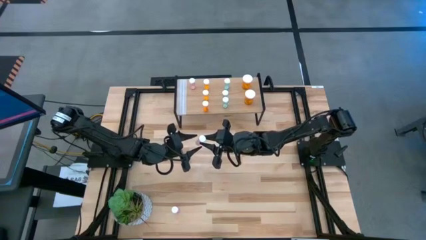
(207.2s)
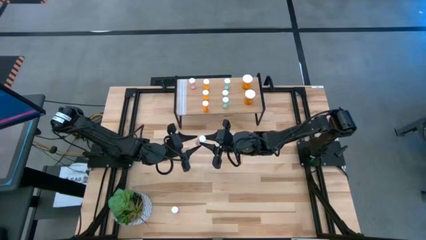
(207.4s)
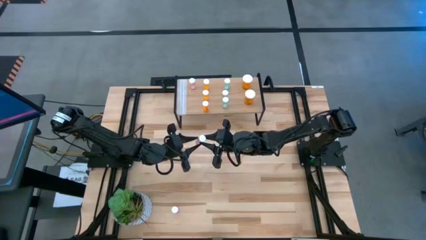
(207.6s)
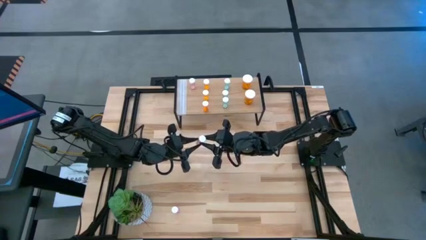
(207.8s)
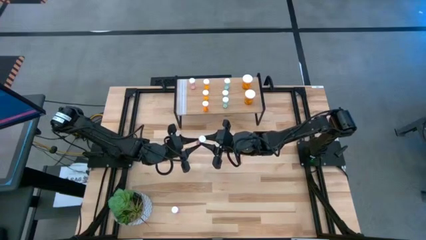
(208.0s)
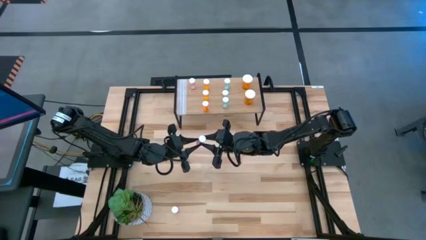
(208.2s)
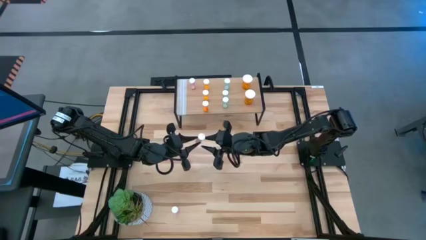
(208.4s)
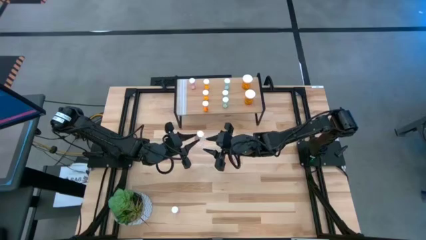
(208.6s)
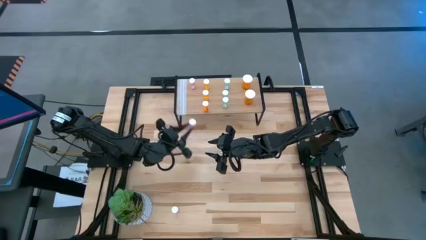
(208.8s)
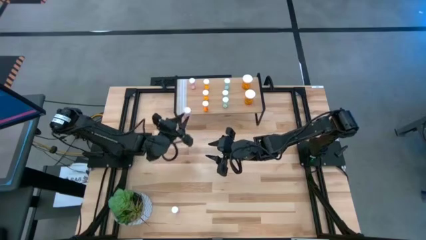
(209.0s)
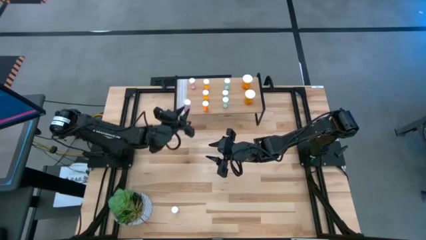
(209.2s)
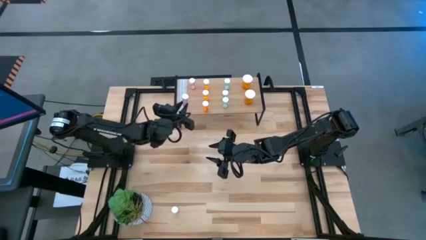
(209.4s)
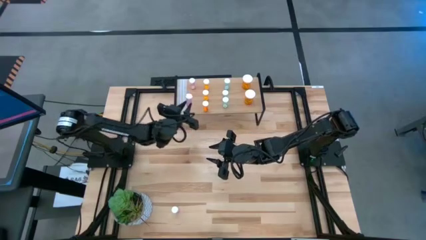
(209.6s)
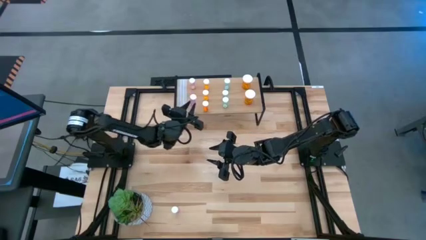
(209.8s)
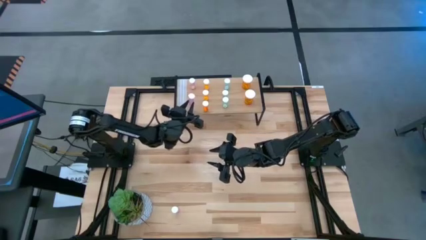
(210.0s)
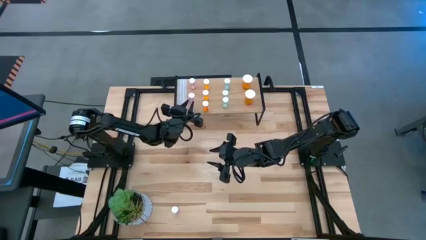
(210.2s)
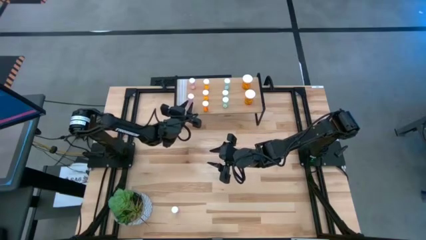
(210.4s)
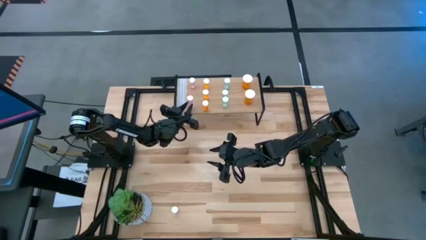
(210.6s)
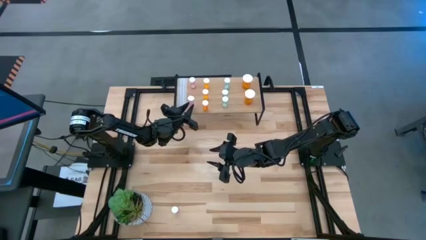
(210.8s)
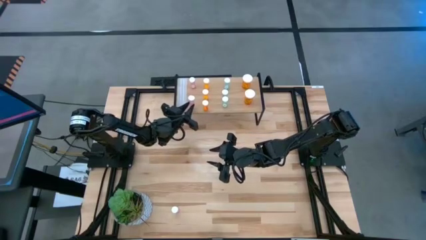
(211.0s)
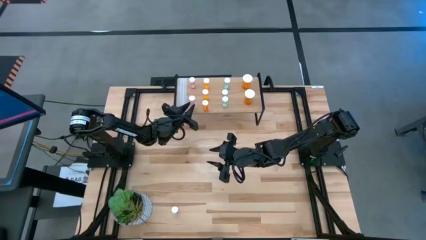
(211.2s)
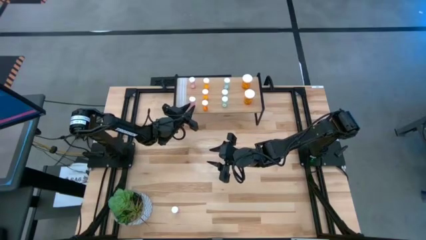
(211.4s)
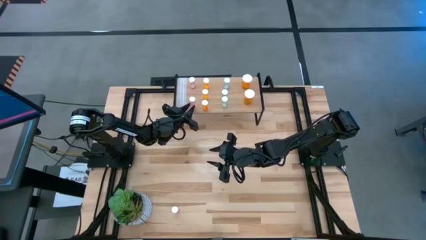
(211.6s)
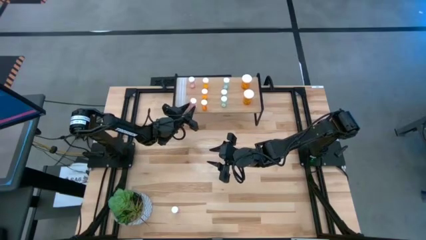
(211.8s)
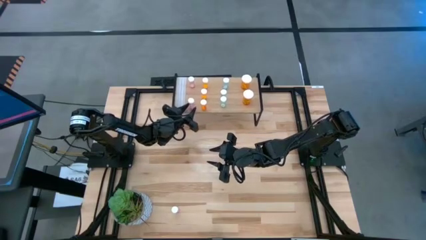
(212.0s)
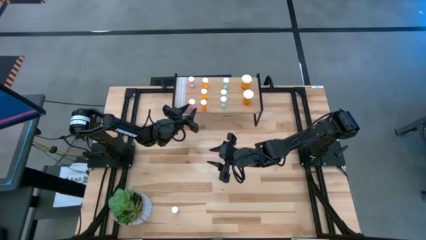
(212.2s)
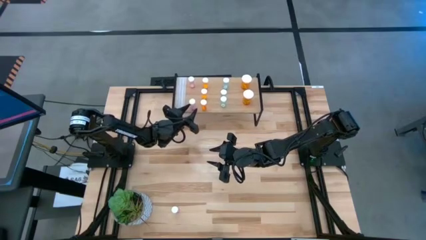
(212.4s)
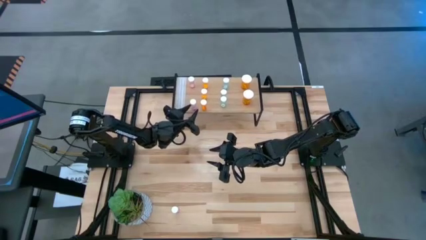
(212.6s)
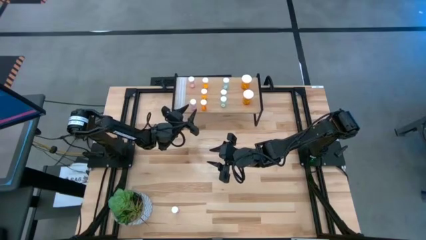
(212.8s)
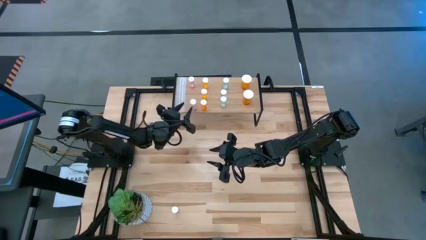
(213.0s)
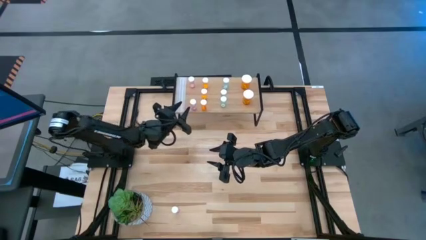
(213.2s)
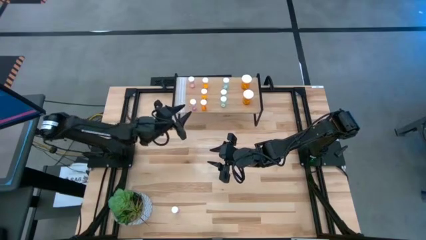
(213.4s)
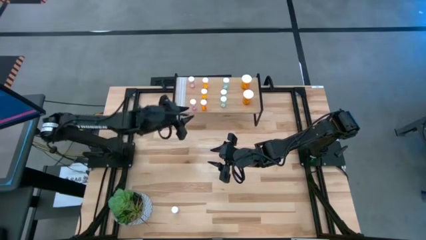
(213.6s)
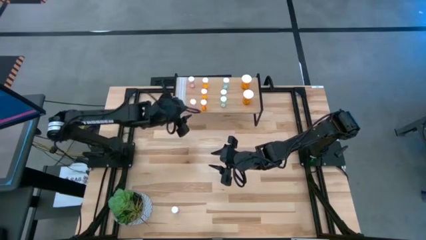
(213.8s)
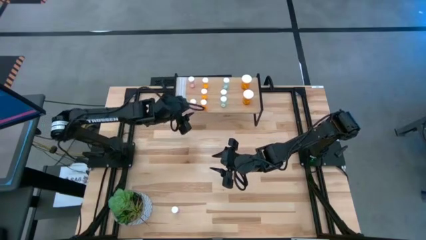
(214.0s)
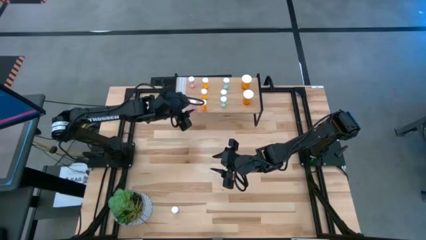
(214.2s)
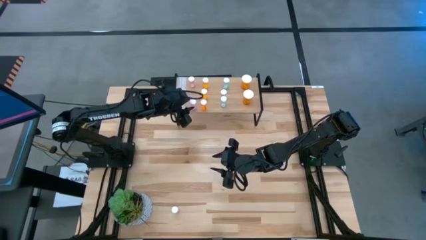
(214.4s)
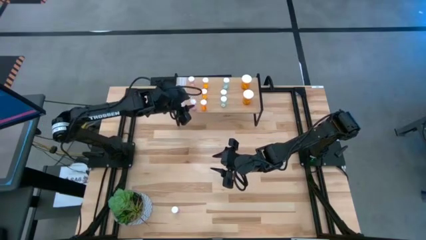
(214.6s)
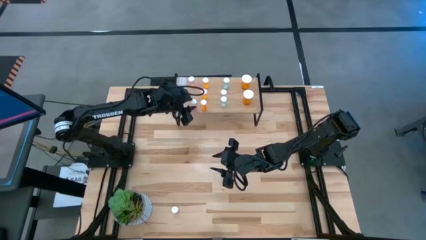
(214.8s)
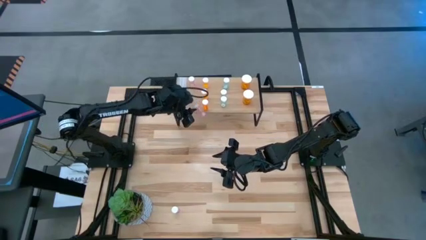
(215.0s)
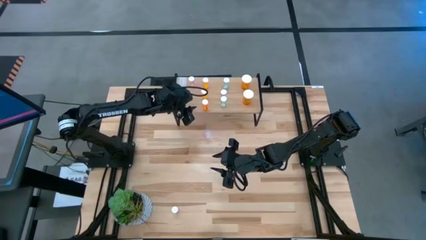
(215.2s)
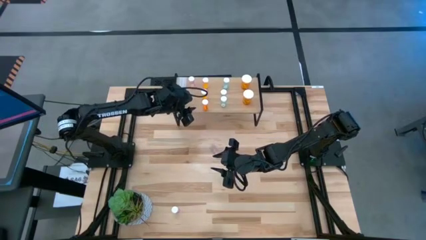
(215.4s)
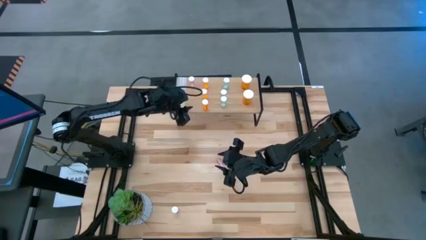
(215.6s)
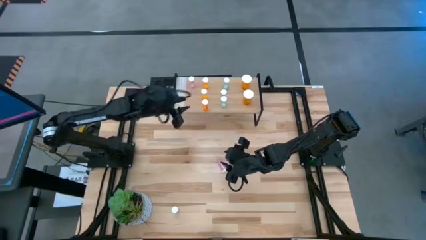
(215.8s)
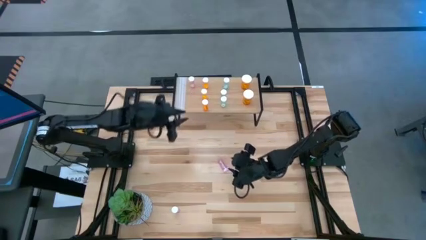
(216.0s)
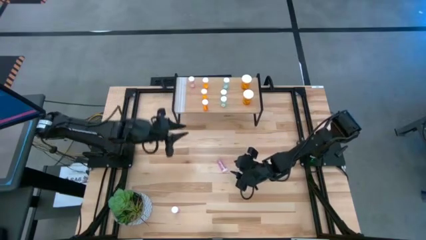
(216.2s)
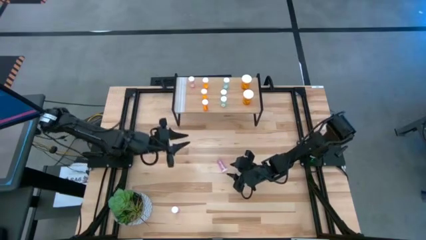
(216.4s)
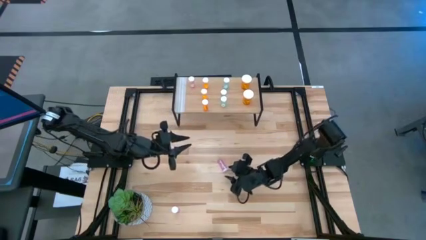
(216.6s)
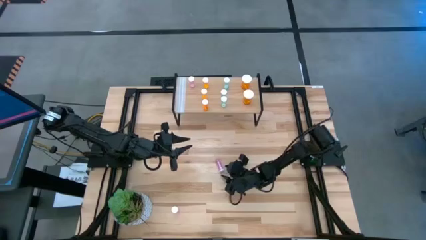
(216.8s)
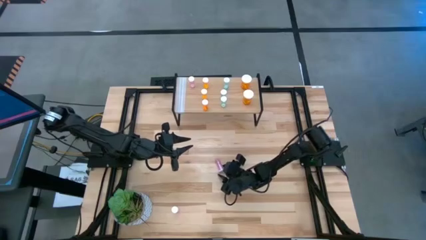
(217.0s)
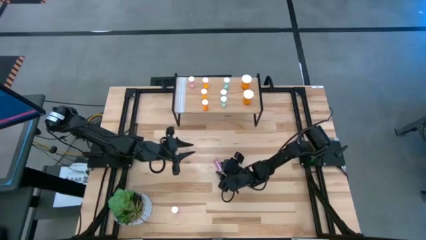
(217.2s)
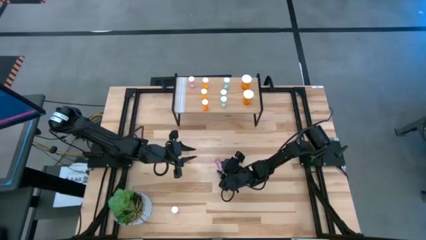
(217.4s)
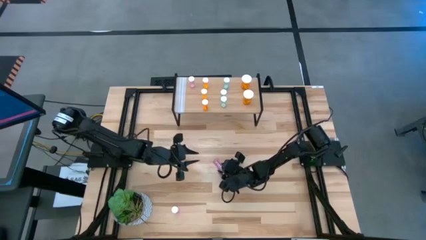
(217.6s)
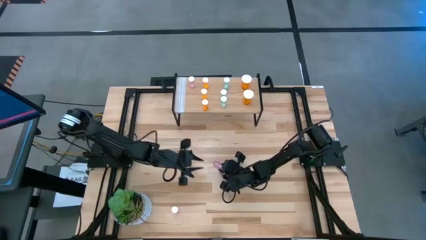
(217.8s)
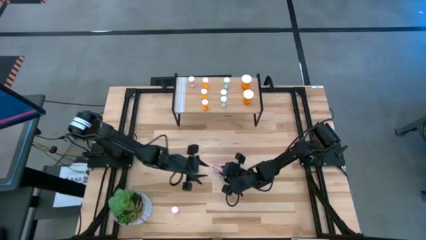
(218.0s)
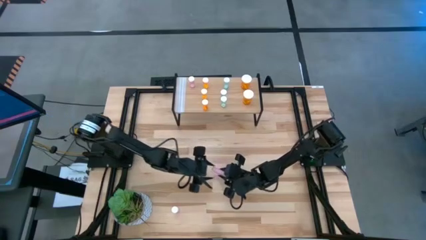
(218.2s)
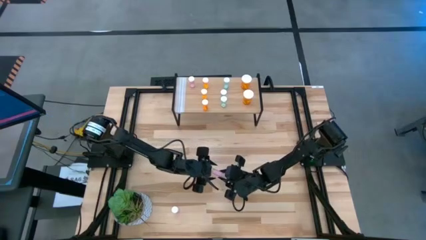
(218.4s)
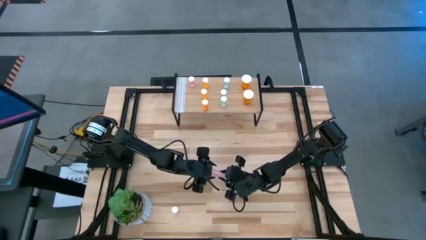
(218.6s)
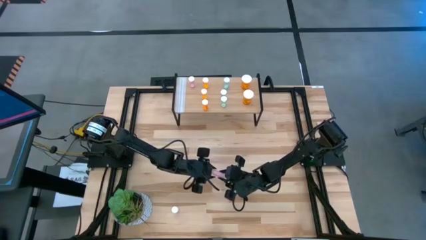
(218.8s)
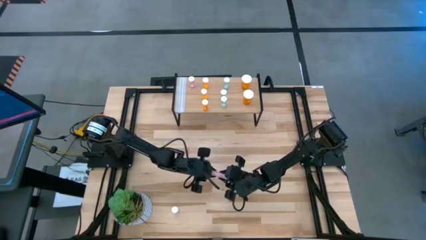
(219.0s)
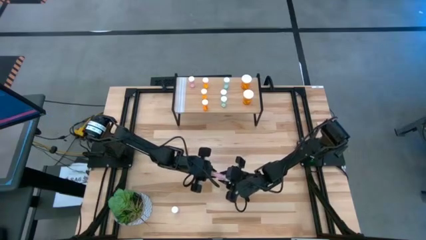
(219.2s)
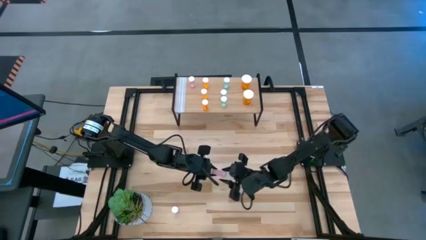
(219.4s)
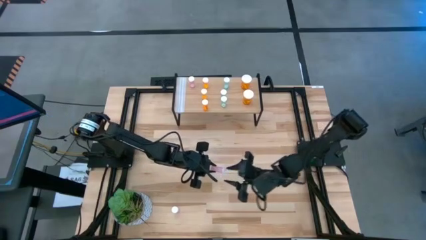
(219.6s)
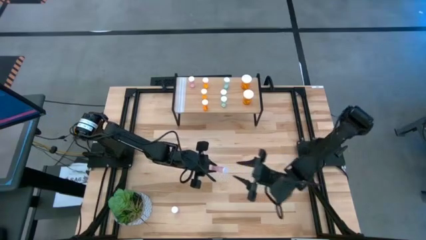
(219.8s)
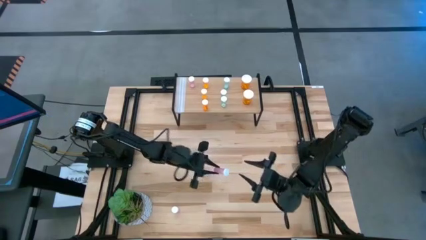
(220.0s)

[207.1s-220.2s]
Task: Pick and place medicine bottles onto shelf by color
Put the top small pink pill bottle on the shelf aligned with the other small pink pill bottle

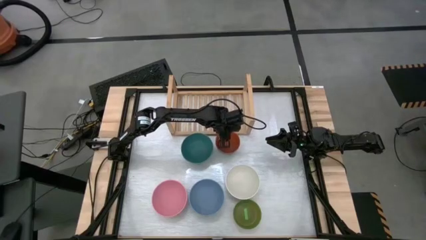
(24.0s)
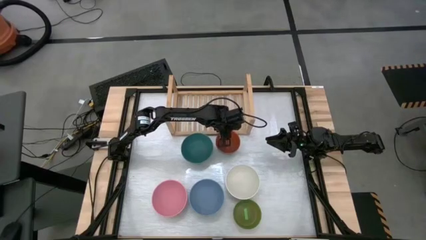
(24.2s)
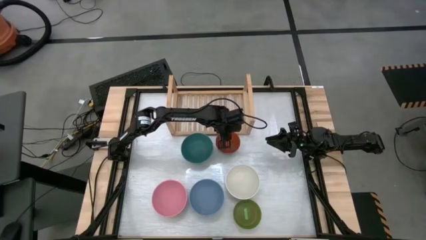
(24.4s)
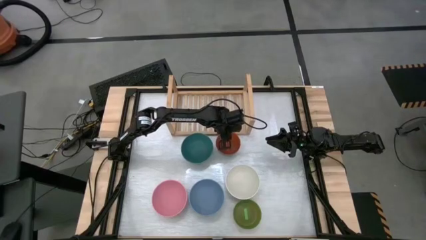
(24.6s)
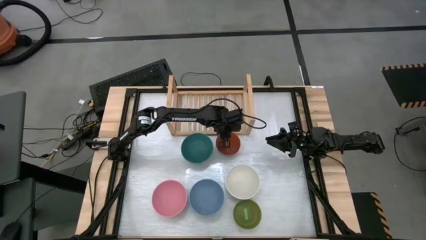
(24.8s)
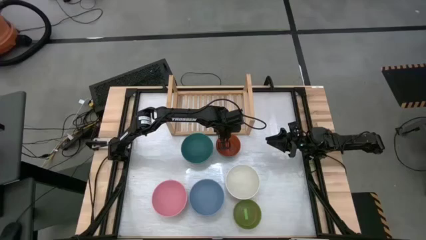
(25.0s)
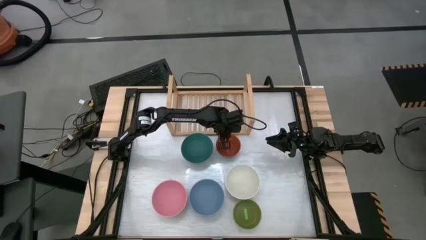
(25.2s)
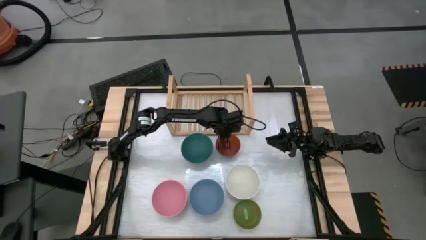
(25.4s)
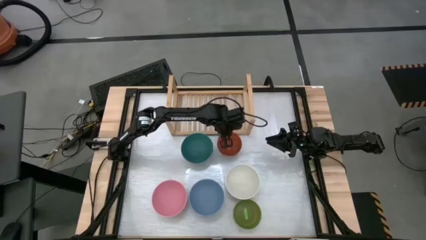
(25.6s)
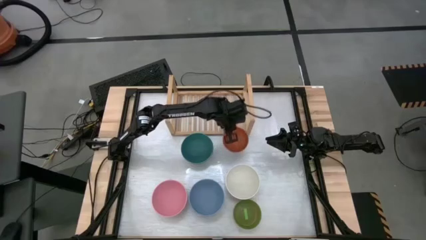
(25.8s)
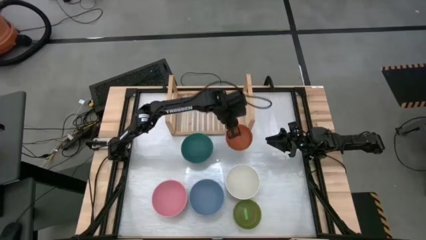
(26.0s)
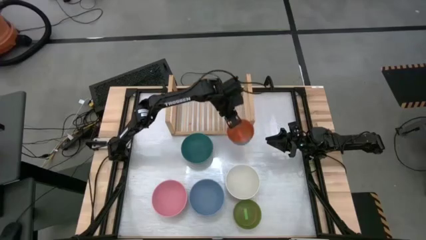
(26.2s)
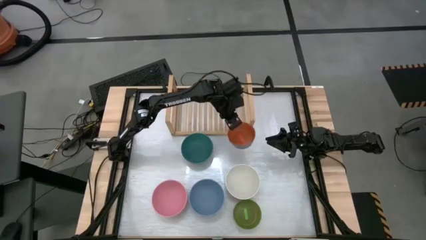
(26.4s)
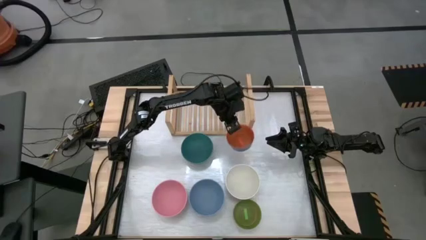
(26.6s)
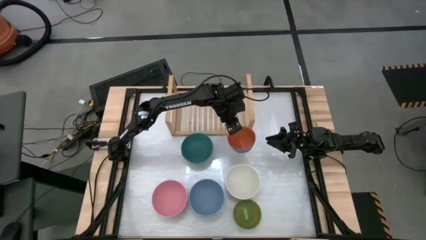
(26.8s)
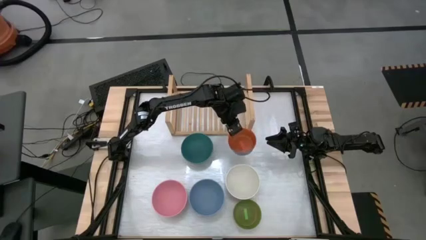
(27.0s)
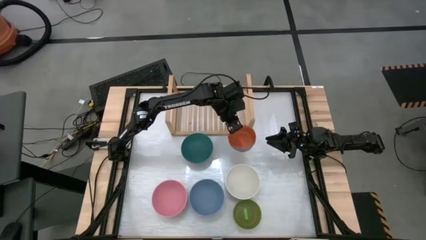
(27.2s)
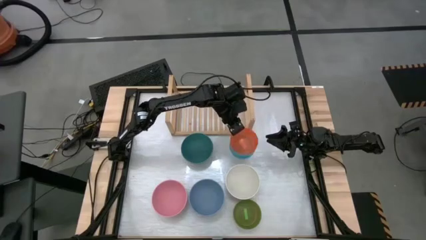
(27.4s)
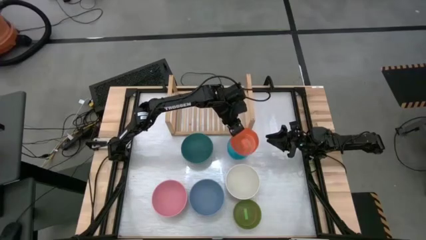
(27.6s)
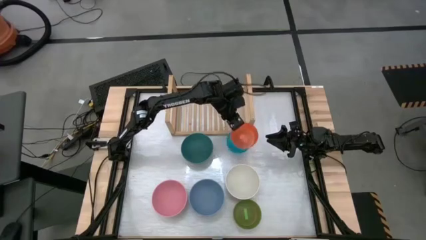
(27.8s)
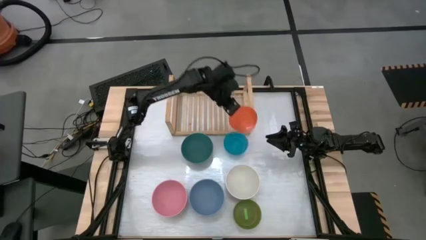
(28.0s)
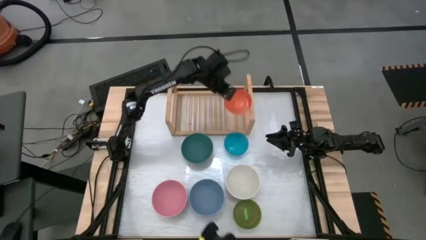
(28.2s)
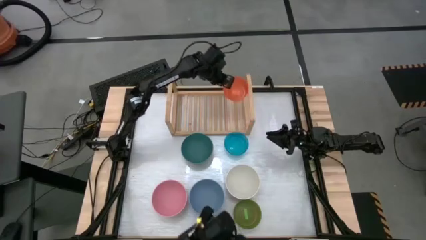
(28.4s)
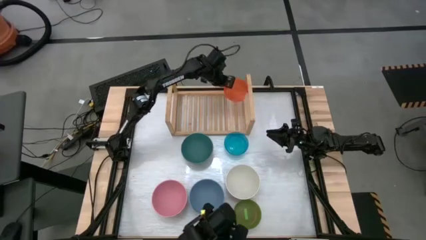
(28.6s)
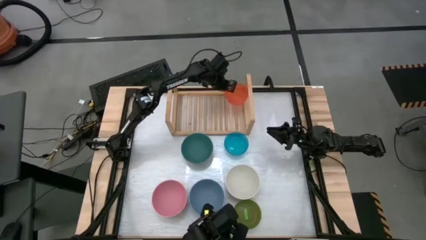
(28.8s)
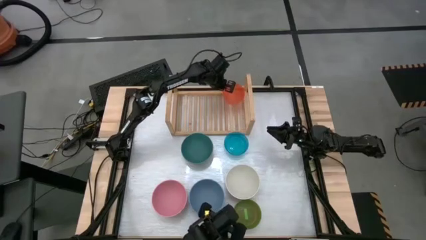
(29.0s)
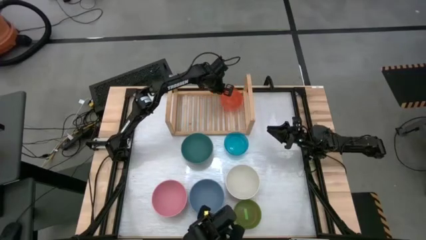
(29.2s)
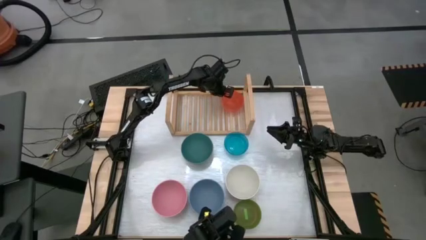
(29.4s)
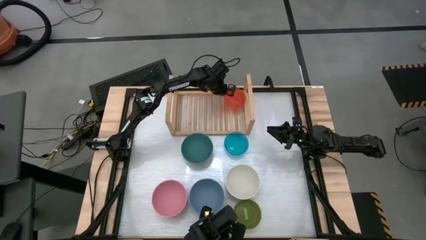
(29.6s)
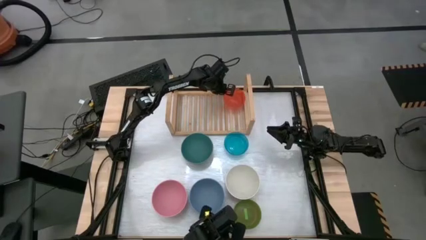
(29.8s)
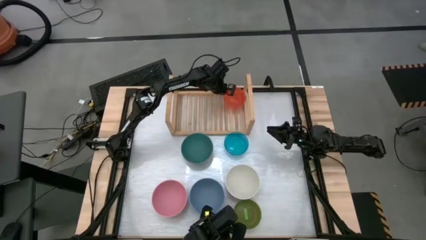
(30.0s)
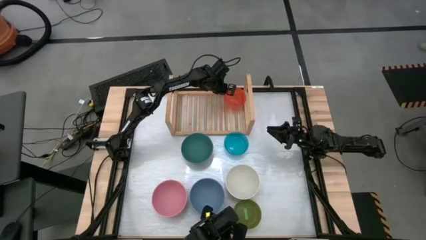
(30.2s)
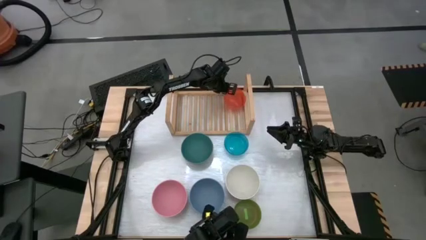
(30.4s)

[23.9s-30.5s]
Task: Place and stack bowls onto a shelf
Put the small orange bowl on the shelf
